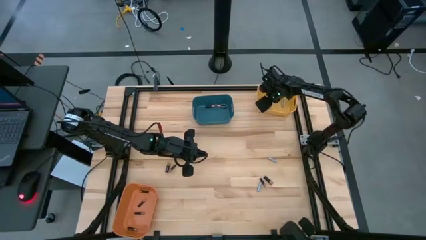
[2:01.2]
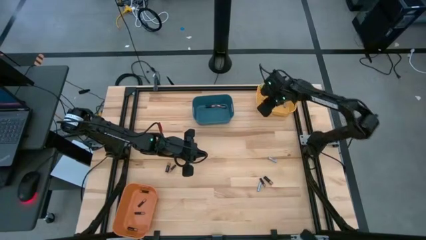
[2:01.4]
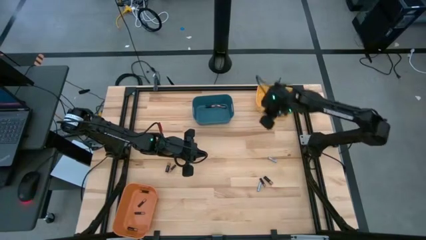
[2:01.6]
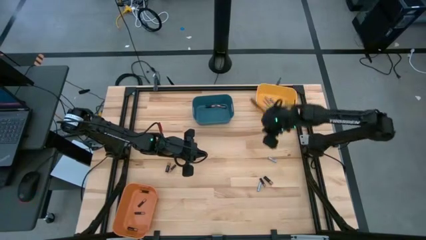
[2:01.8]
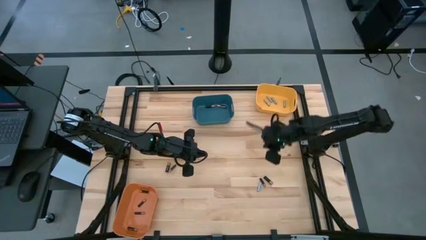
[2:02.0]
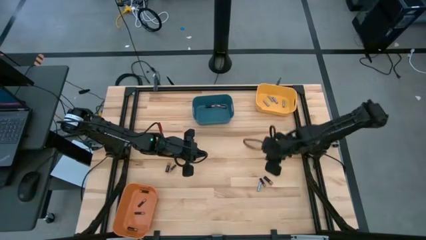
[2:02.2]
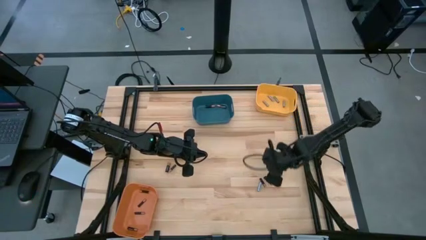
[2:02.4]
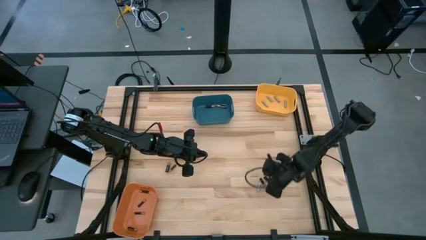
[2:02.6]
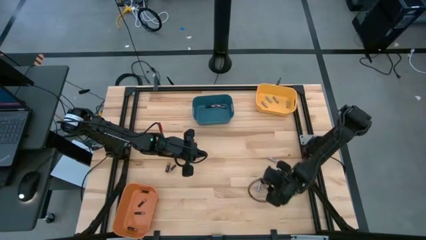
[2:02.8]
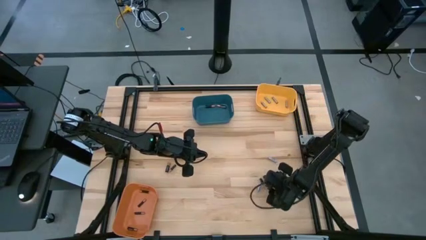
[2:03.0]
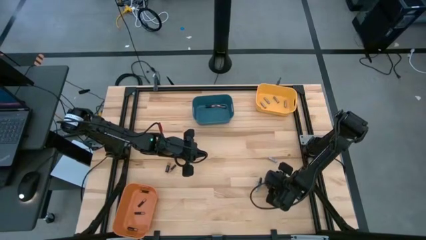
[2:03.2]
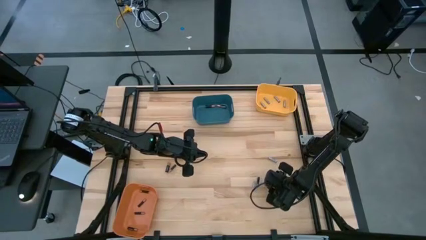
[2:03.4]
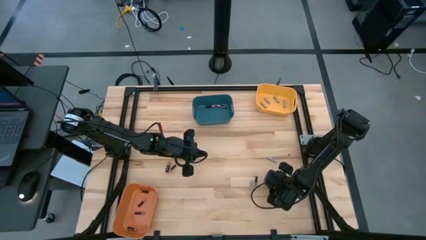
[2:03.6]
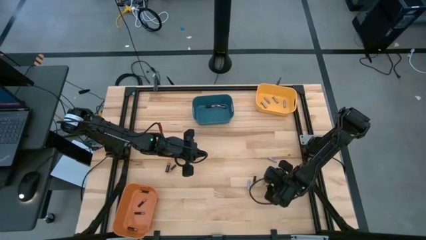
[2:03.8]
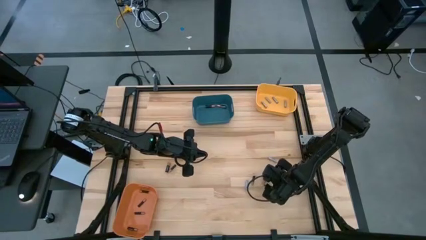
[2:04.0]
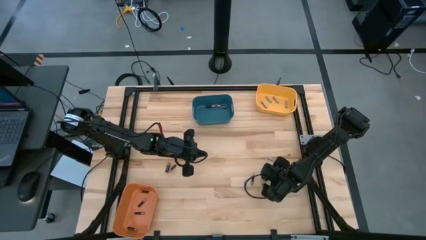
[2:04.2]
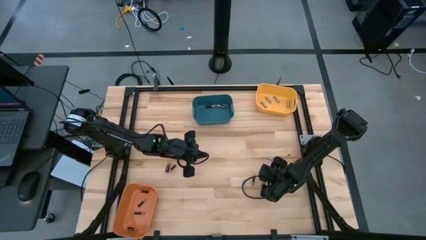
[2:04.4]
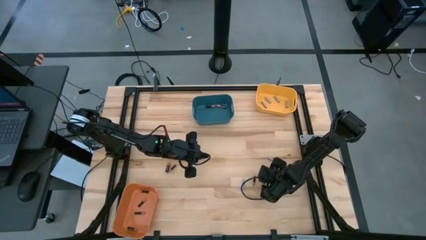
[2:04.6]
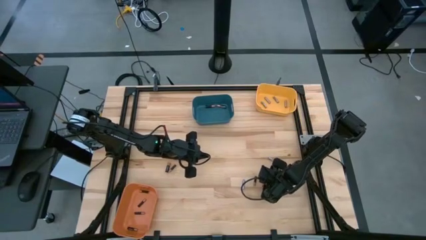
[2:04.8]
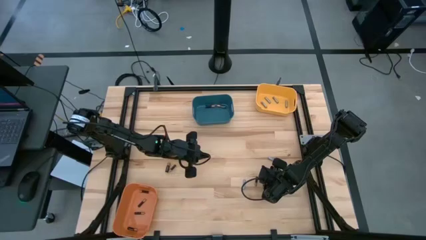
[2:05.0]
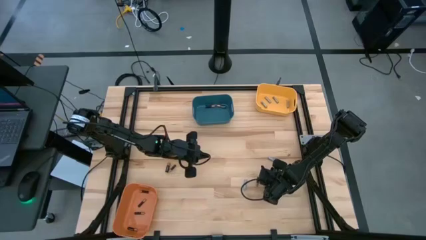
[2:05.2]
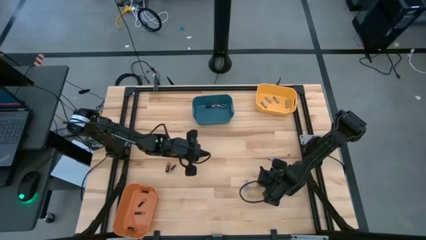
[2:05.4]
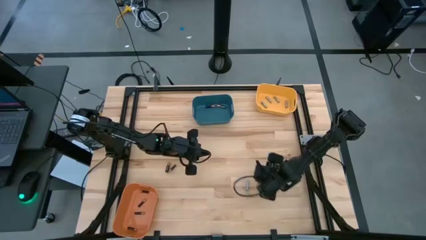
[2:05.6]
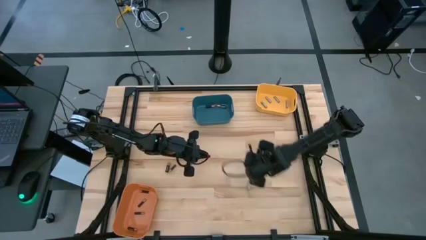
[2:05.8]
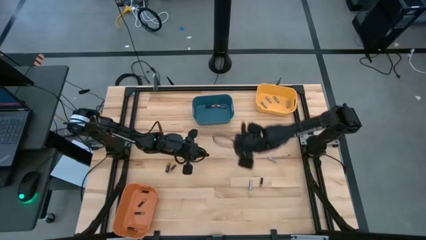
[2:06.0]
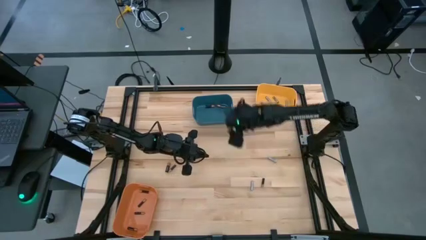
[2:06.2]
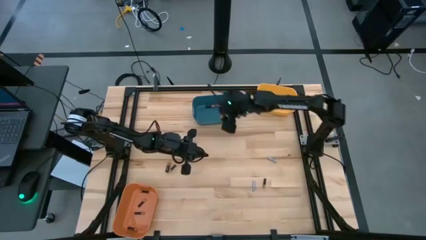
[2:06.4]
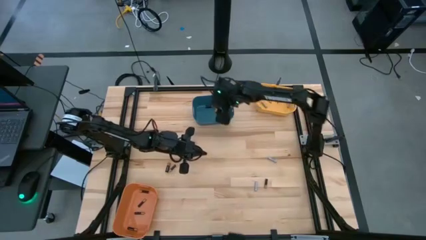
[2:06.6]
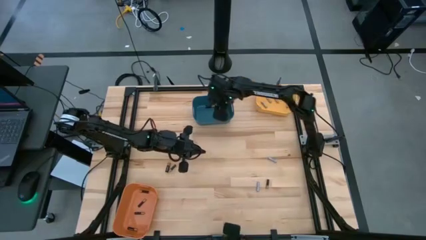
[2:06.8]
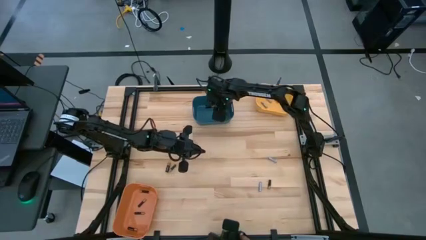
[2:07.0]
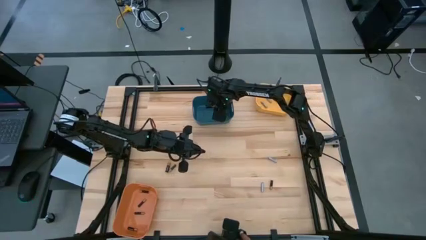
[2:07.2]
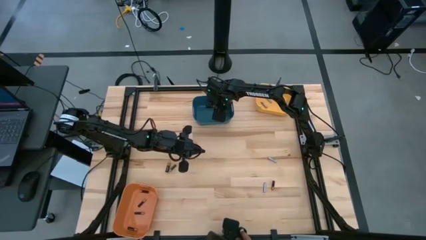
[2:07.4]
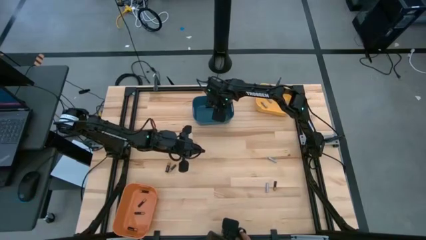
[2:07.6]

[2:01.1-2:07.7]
Task: Sort batteries
Put the large black battery into the blue bin

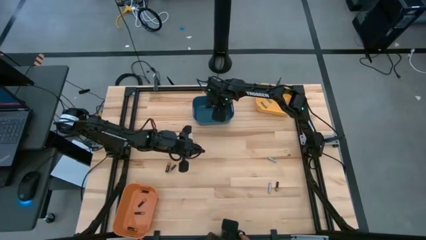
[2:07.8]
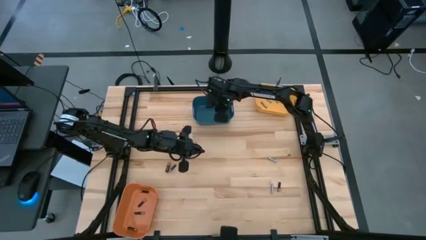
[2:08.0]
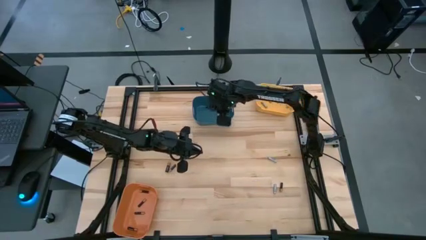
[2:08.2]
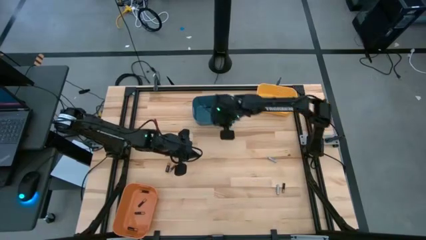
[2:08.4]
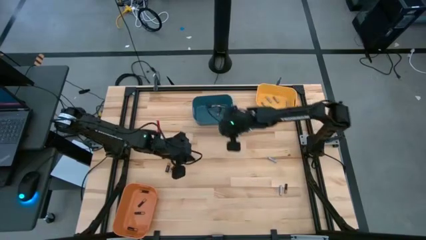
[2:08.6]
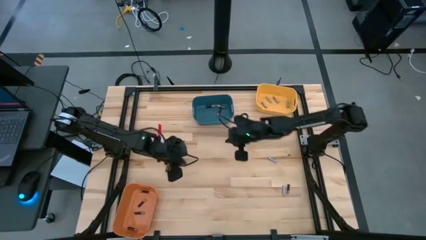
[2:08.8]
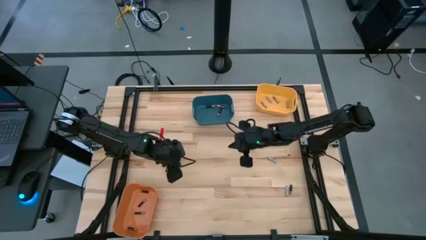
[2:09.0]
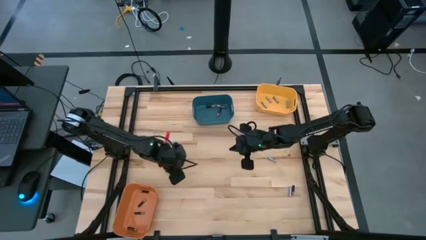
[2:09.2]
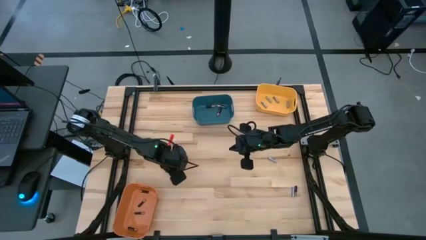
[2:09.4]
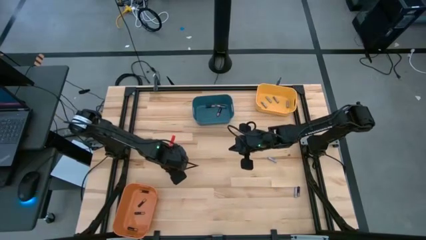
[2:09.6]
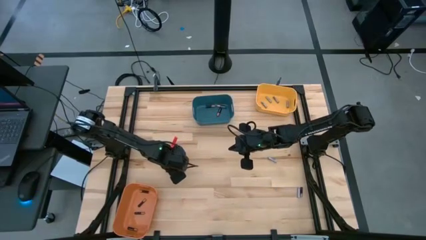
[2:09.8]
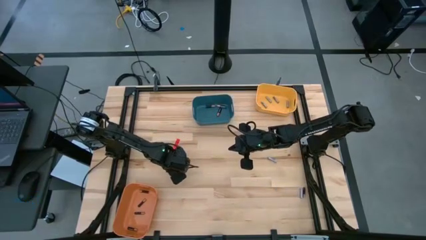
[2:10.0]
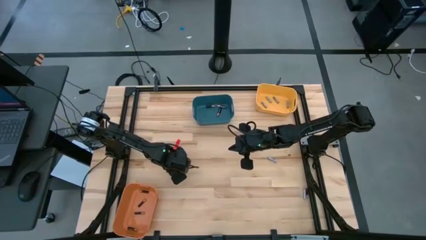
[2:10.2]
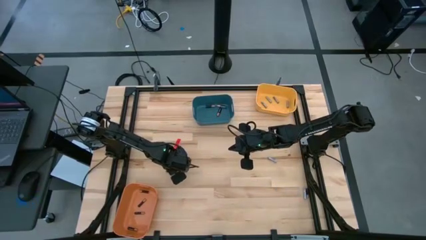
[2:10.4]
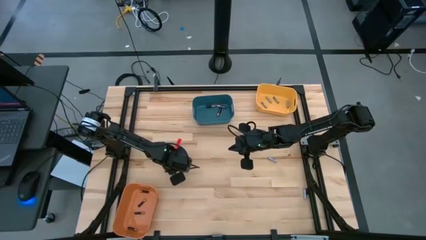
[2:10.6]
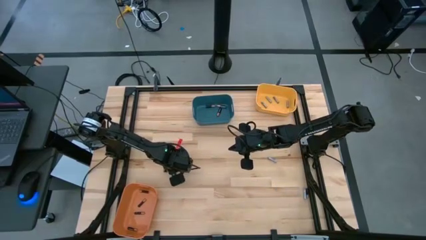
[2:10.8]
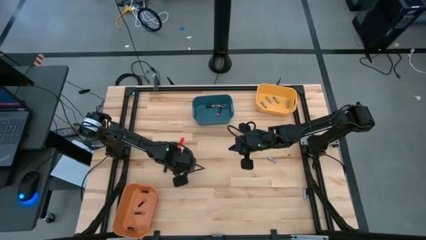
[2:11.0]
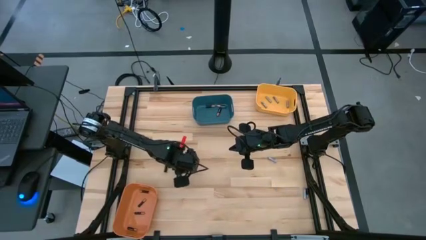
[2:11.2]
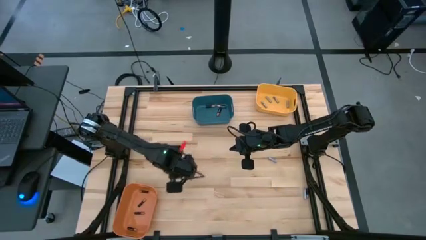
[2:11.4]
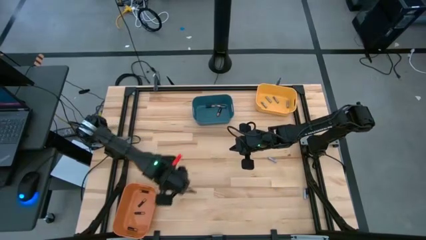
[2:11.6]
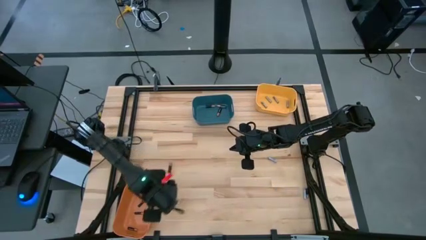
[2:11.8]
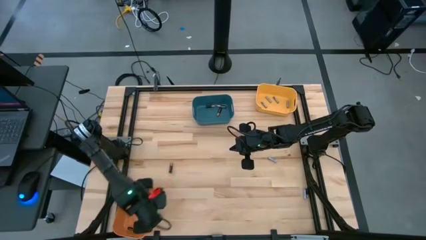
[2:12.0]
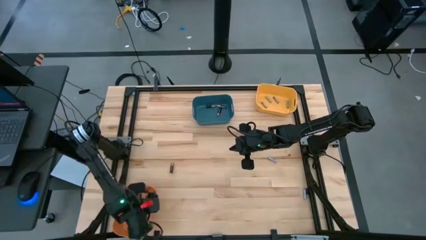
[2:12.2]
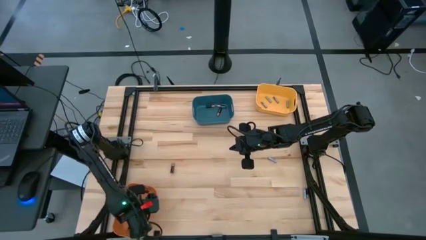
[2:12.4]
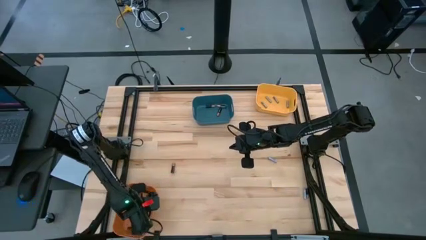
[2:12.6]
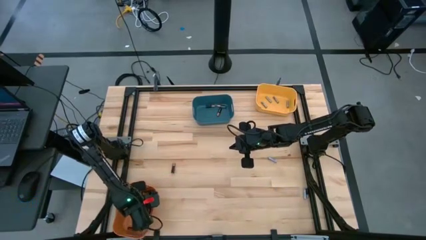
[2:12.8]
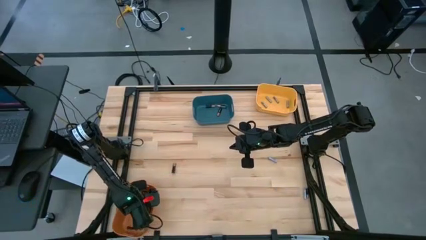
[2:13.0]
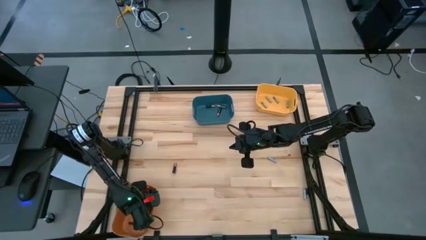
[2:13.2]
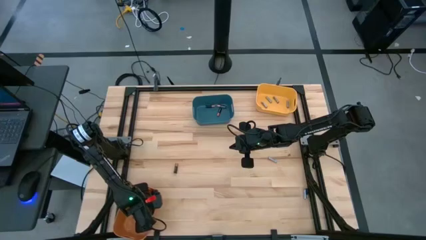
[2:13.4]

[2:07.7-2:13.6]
Put the small black battery into the orange bin

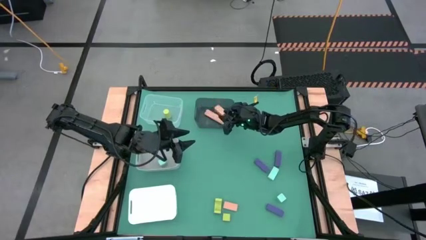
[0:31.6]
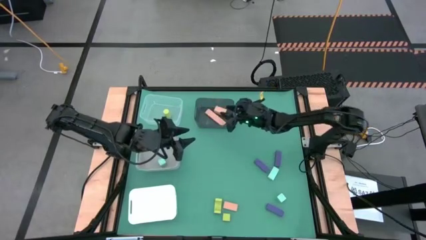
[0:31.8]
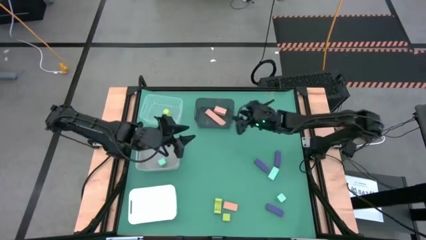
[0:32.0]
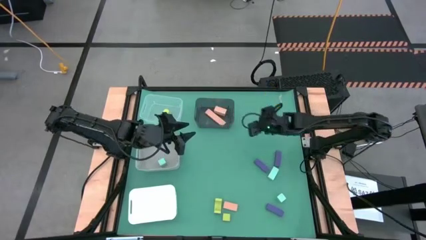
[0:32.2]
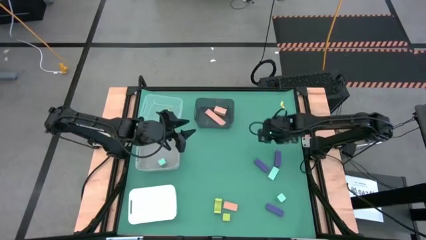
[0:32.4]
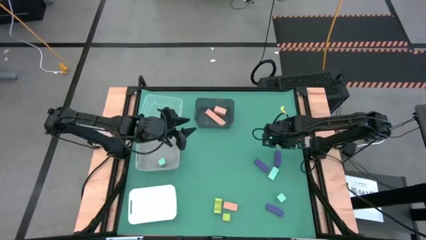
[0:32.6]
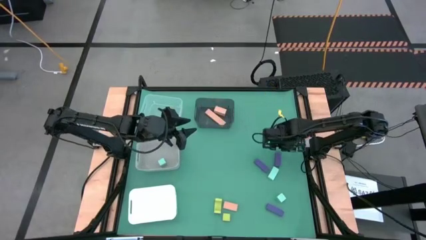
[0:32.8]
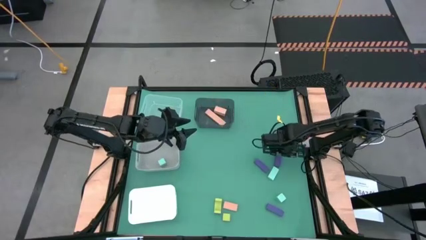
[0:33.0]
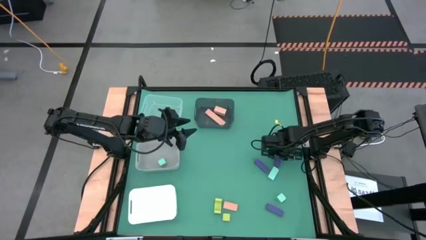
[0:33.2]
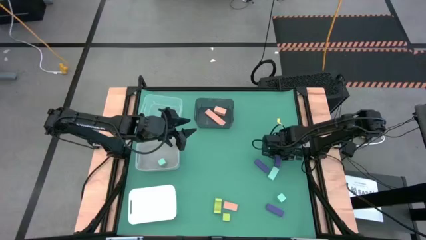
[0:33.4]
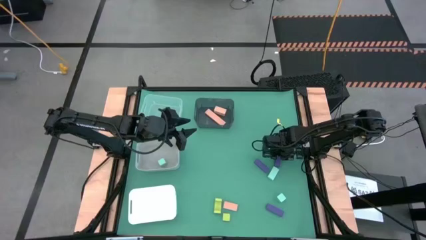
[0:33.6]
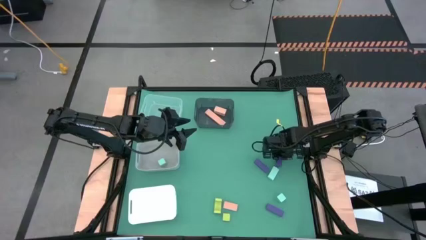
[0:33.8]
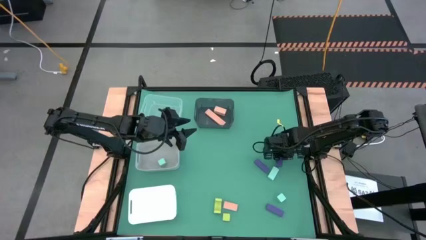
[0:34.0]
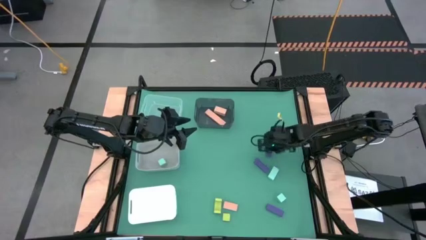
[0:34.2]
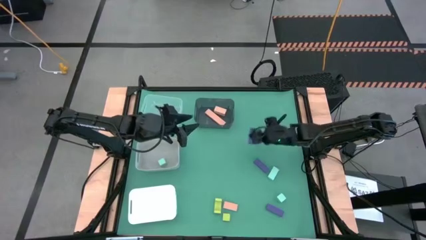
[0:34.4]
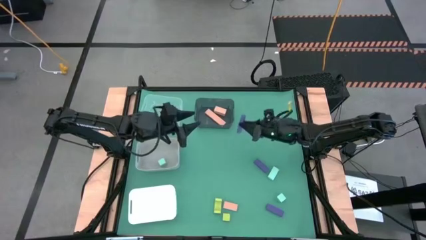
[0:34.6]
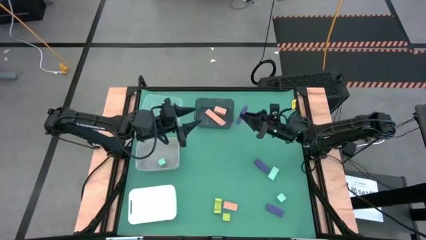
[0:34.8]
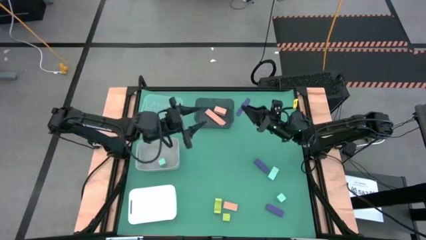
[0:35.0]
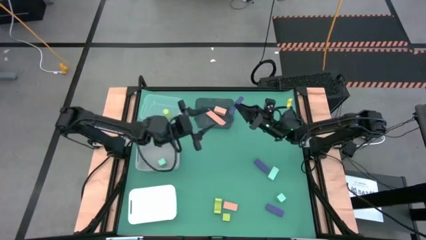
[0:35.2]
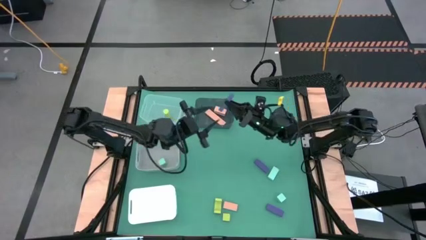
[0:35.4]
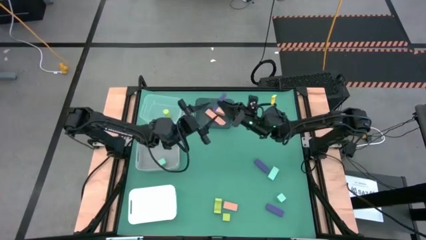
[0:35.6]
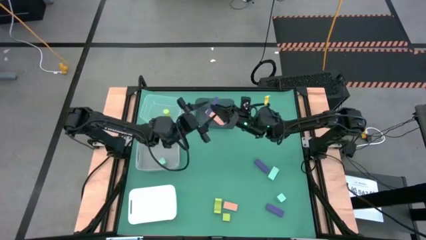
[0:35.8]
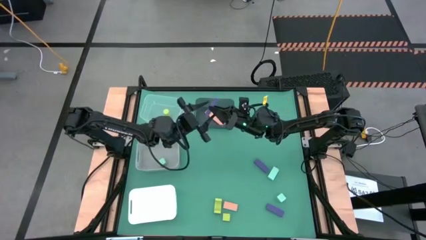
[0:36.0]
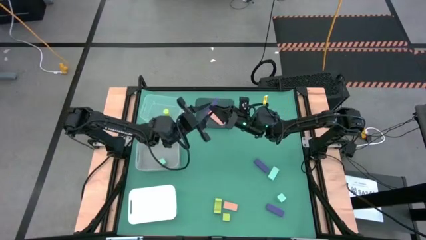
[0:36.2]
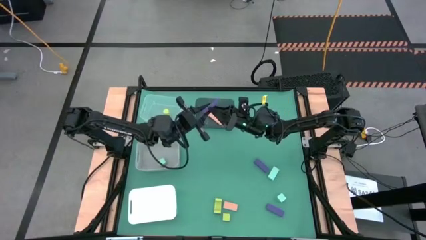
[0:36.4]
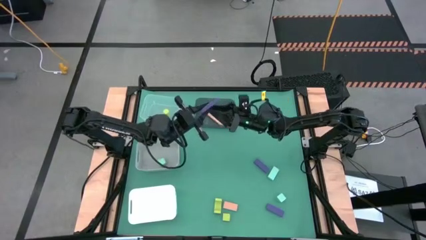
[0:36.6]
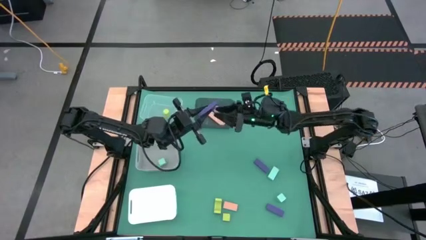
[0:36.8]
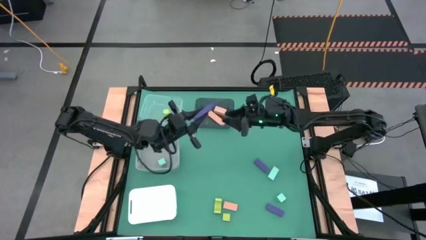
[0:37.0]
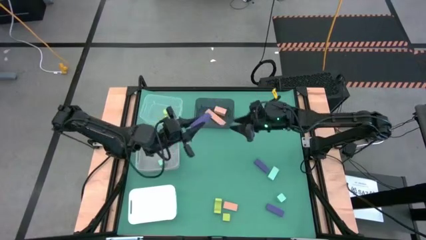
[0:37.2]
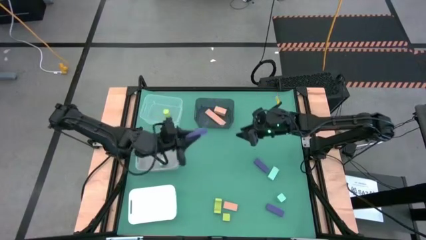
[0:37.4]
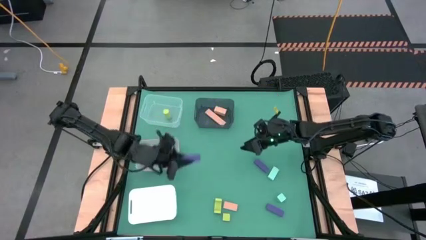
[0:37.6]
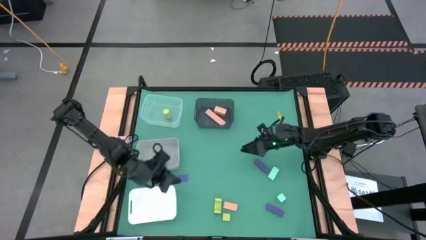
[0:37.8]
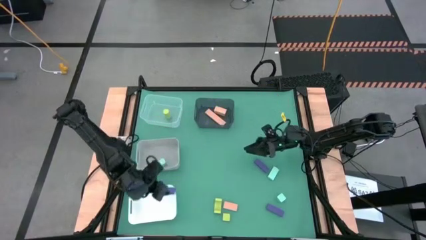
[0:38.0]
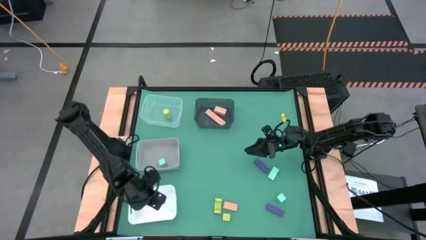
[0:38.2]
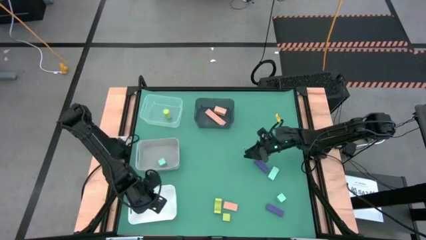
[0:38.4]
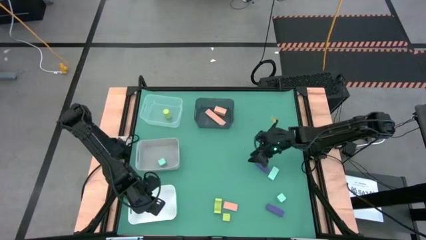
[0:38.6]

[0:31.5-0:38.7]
Task: Sort & place blocks by color
Put the top right violet block into the white bin
